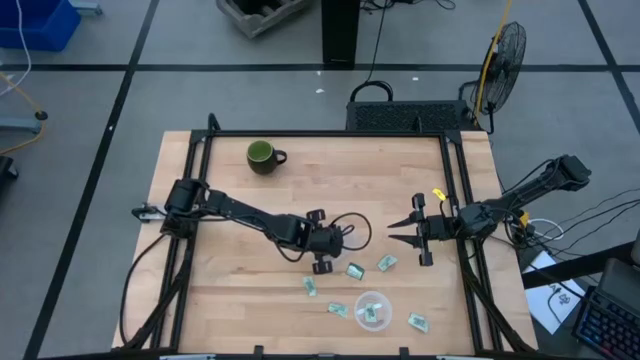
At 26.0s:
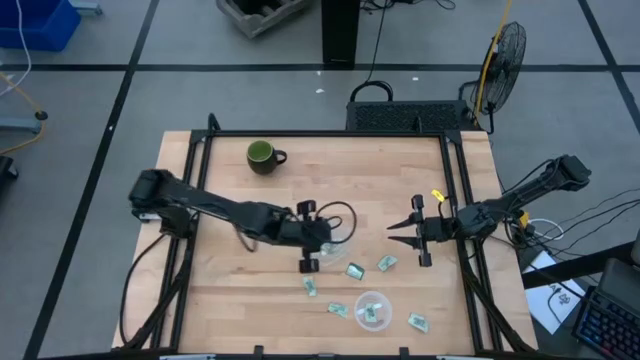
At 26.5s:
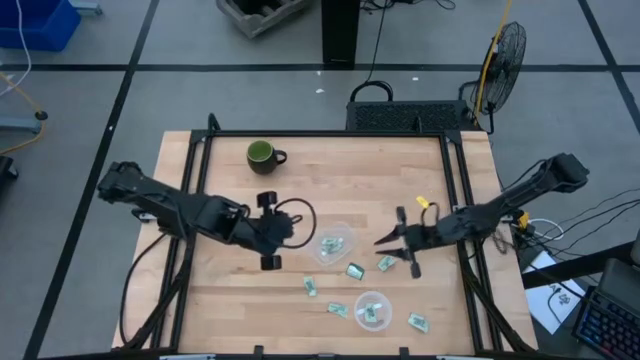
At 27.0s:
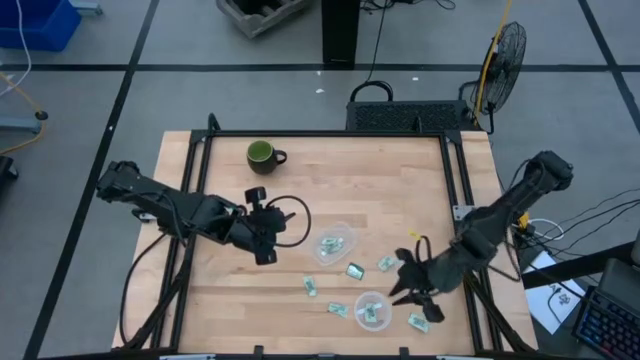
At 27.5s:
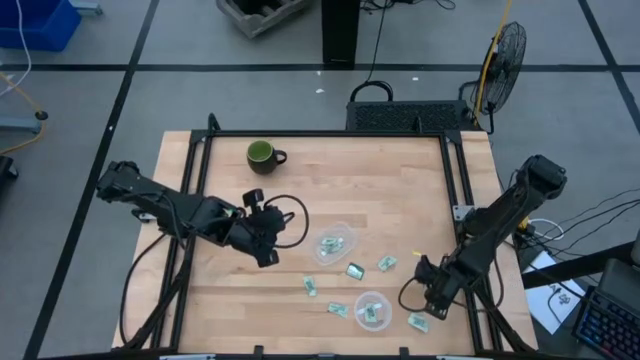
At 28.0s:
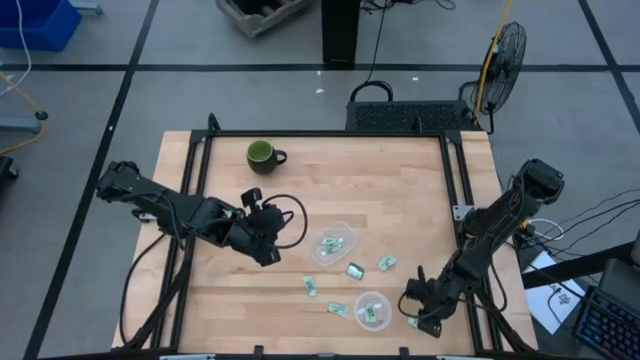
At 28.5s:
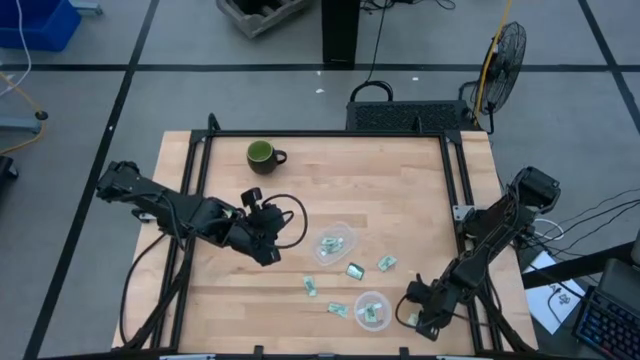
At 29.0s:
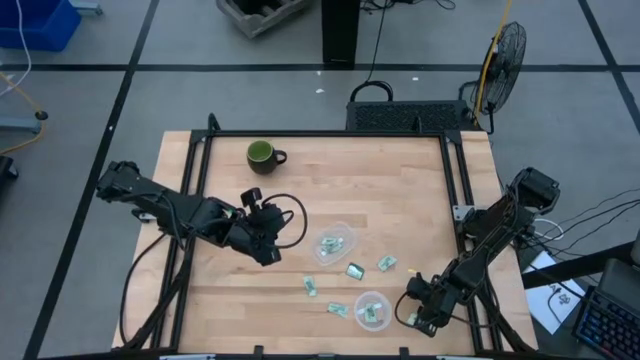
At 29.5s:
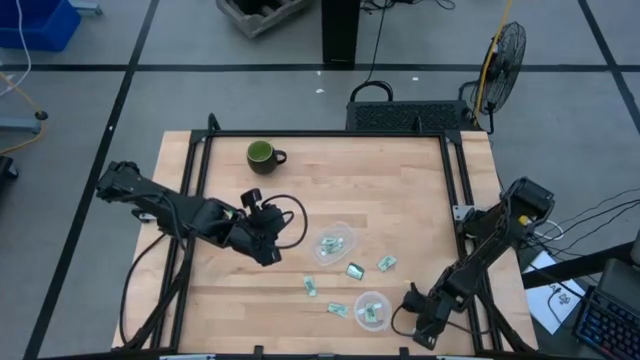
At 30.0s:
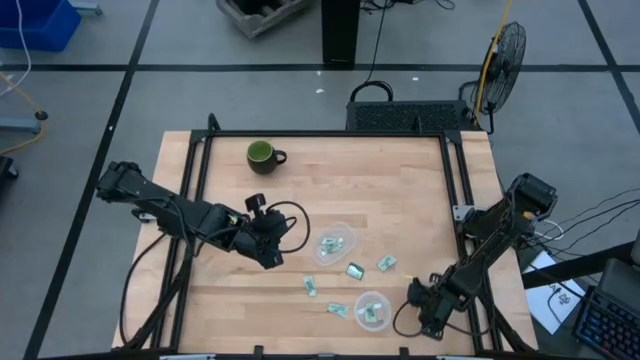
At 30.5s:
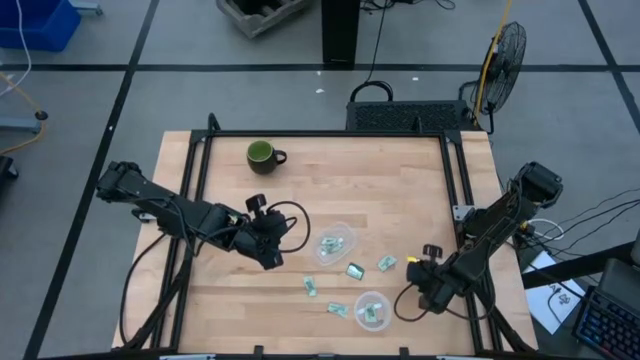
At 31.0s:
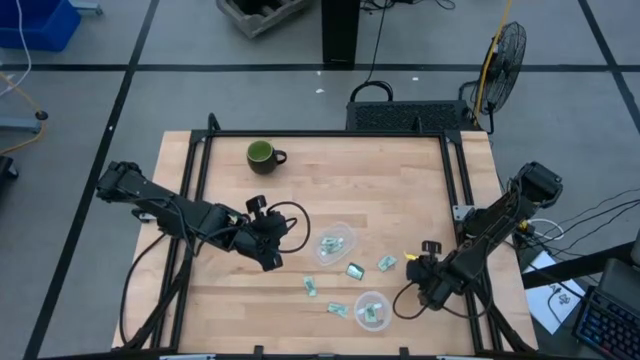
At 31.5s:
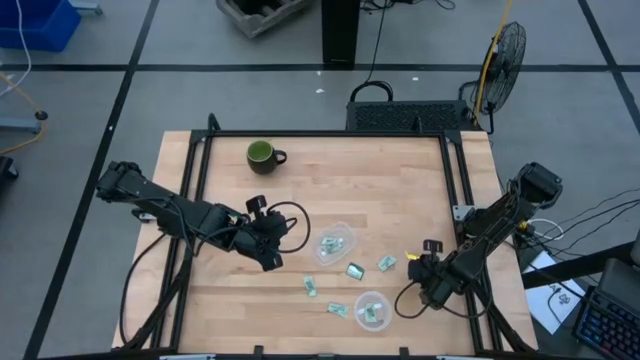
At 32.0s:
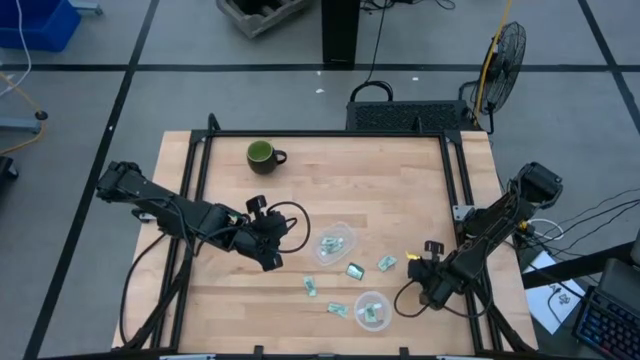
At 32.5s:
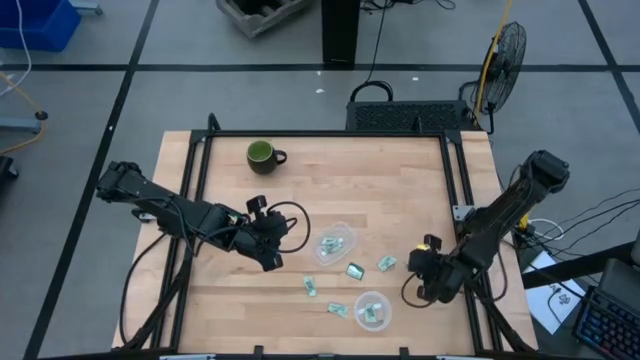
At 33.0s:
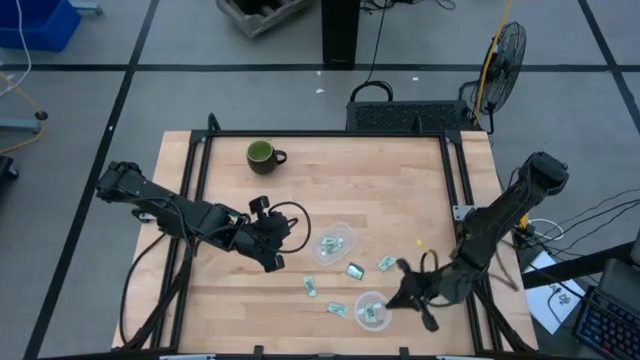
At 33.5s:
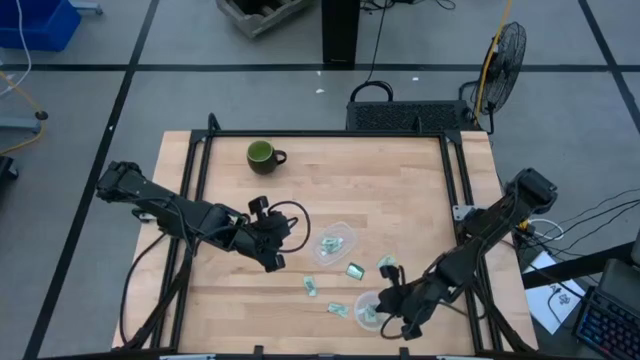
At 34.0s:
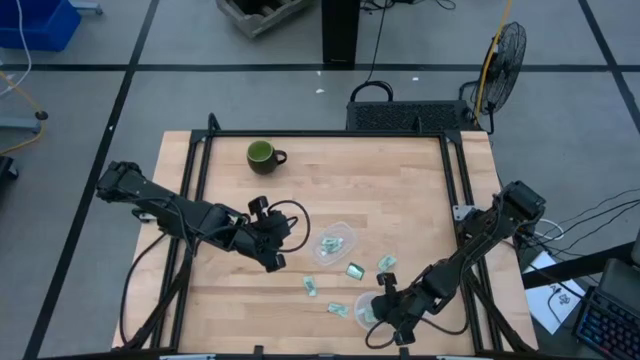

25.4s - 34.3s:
Task: Pick and place Stevia / Truvia into bins
Put the stevia packet into the bottom transparent container

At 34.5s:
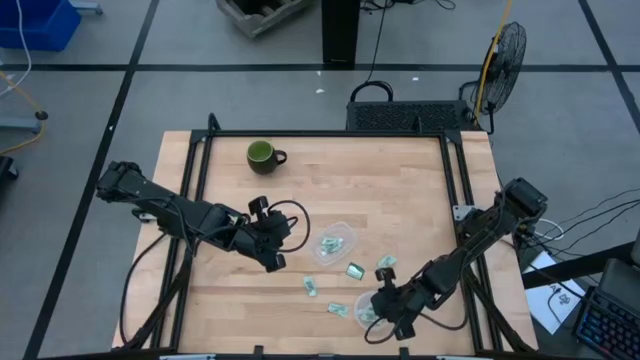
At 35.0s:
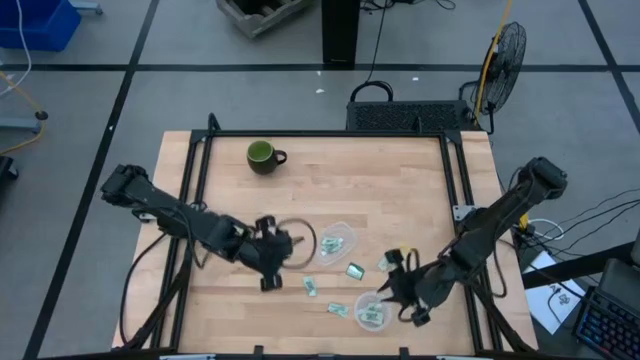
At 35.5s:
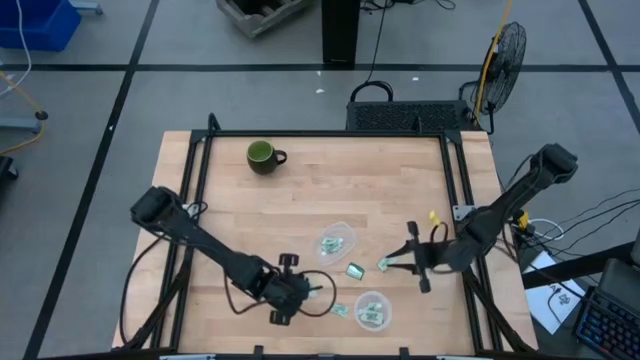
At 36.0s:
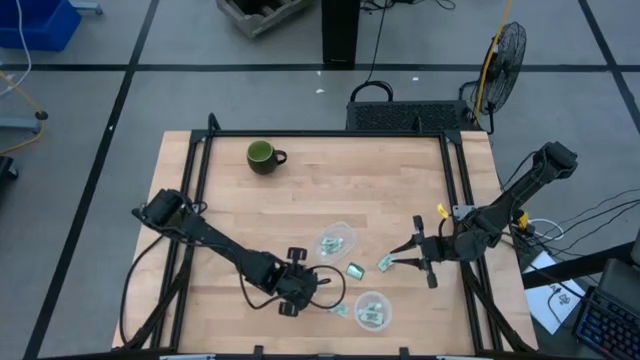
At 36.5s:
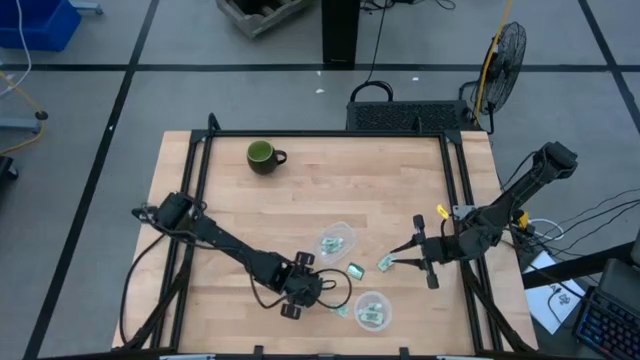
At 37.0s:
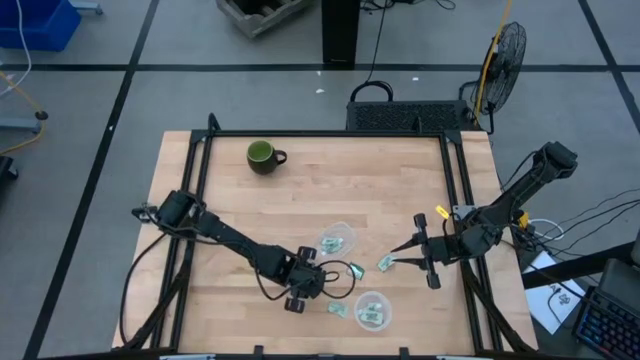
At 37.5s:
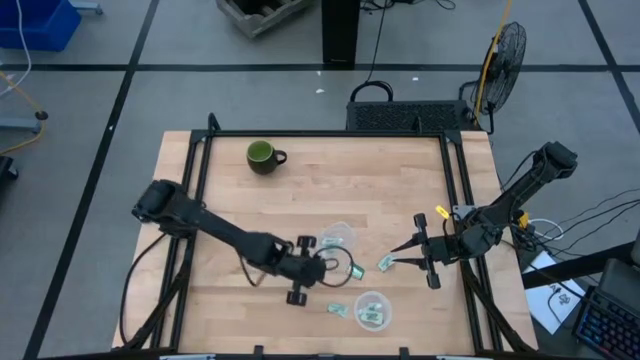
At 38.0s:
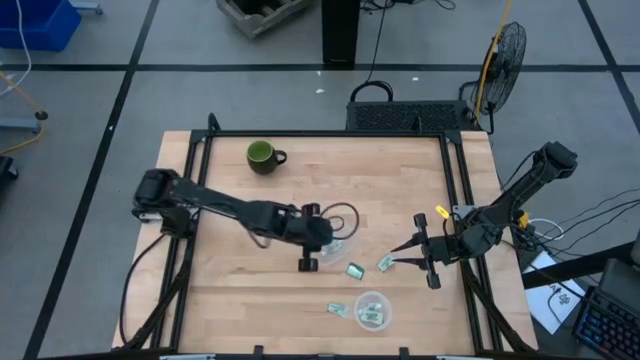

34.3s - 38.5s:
Put the stevia packet into the top transparent container

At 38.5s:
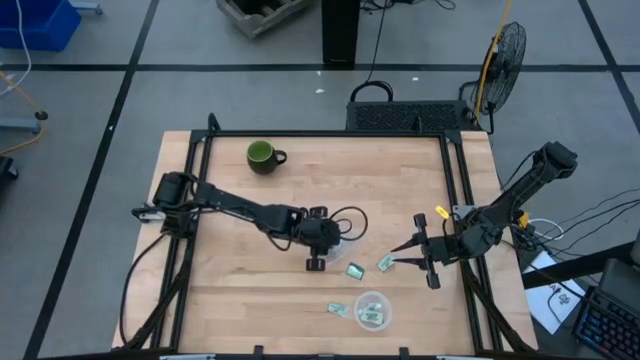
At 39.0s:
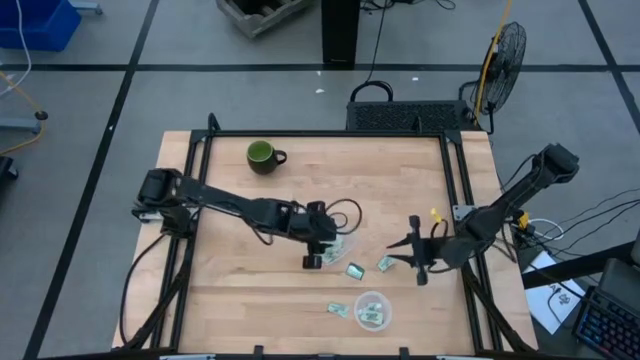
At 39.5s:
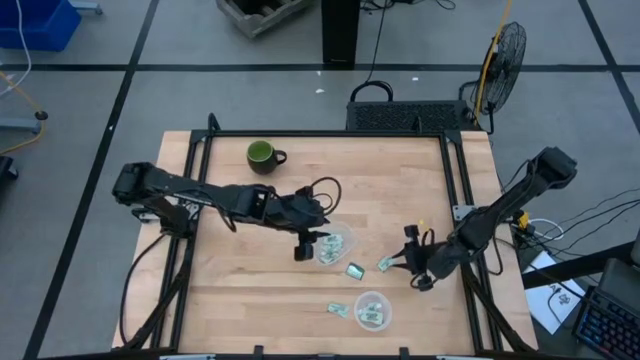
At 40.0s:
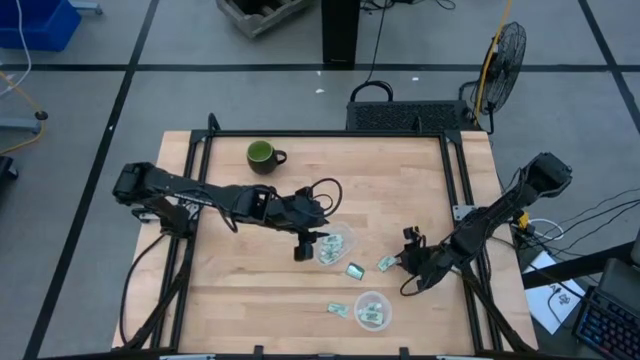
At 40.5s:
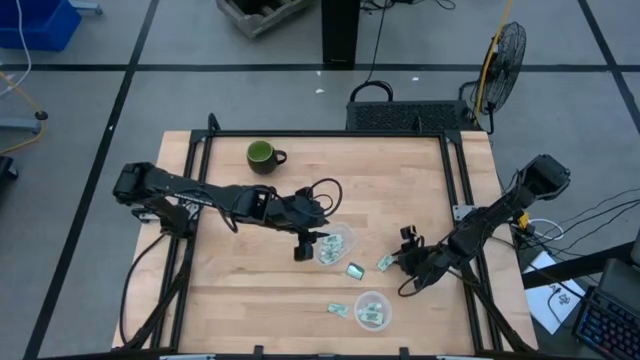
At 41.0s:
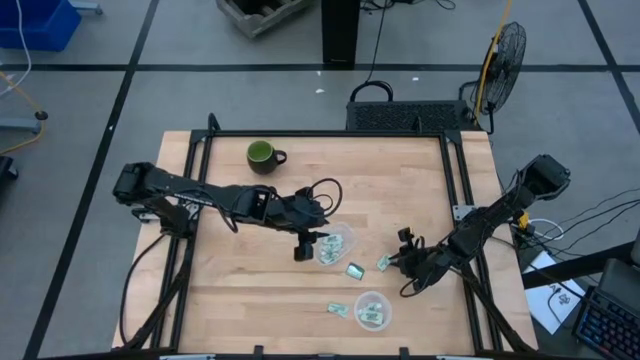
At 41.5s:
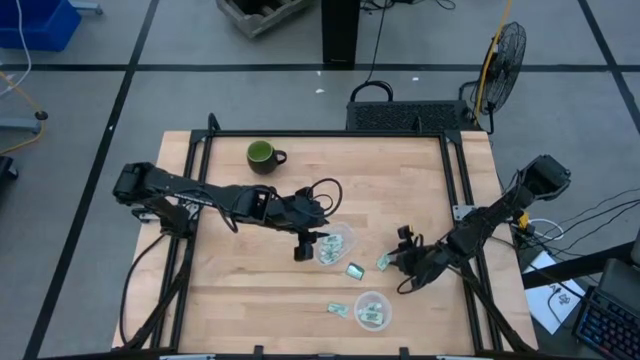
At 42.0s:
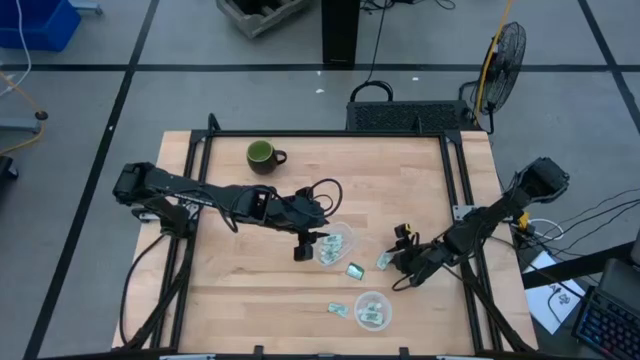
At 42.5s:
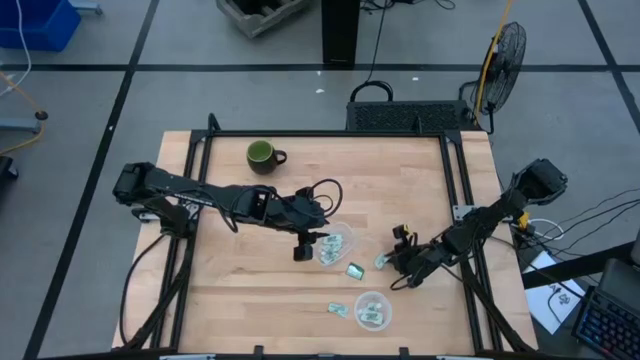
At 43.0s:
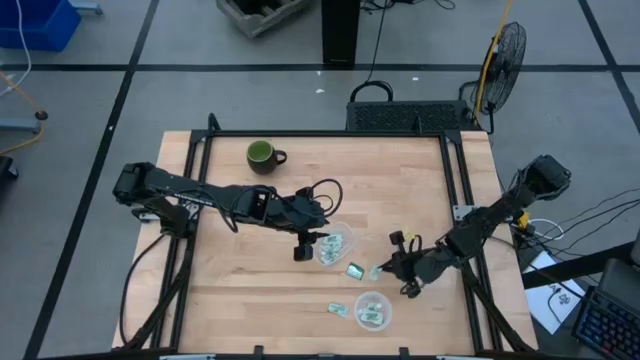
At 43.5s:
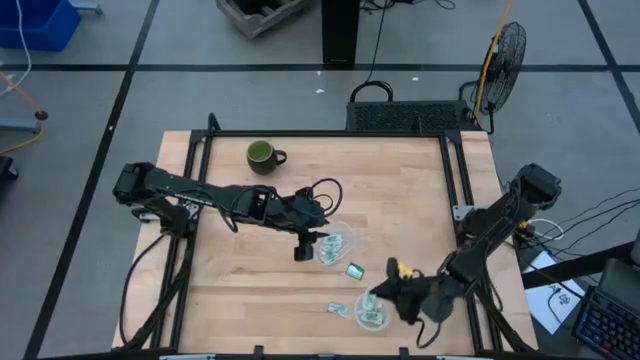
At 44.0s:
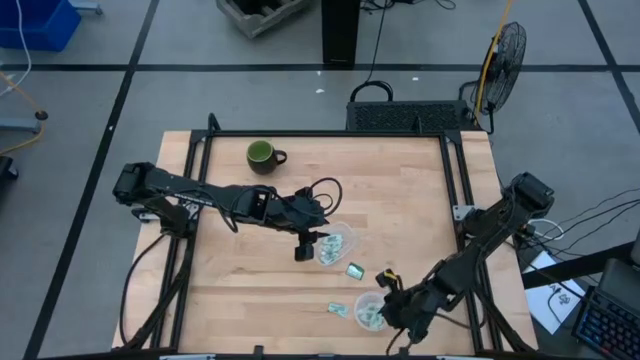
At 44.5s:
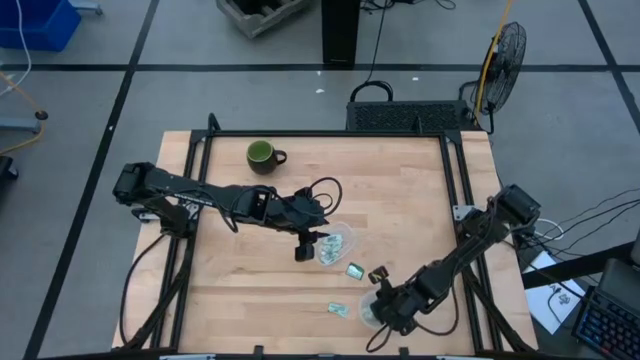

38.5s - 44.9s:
Put the stevia packet into the bottom transparent container

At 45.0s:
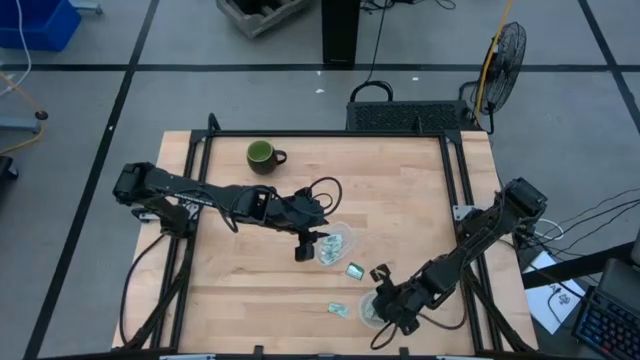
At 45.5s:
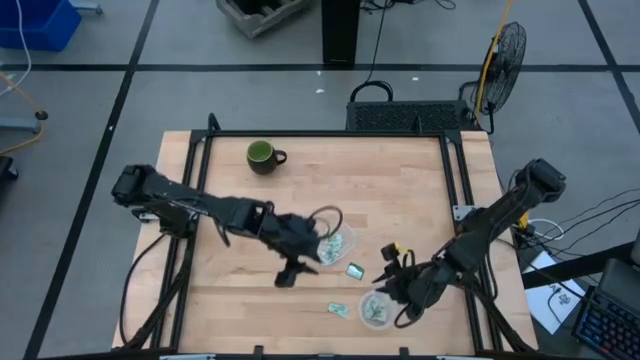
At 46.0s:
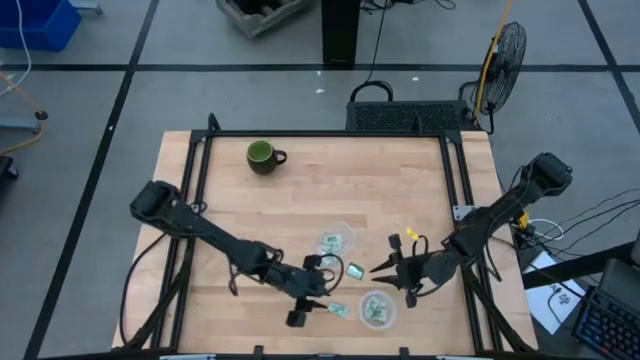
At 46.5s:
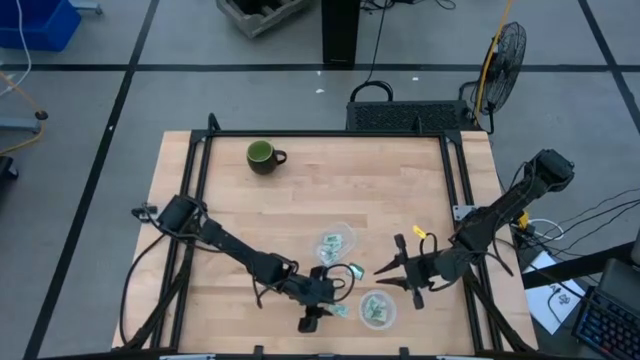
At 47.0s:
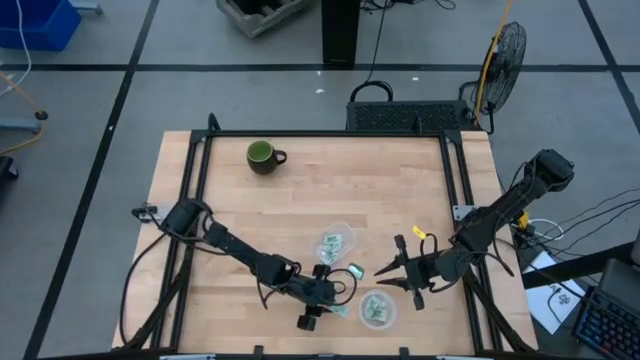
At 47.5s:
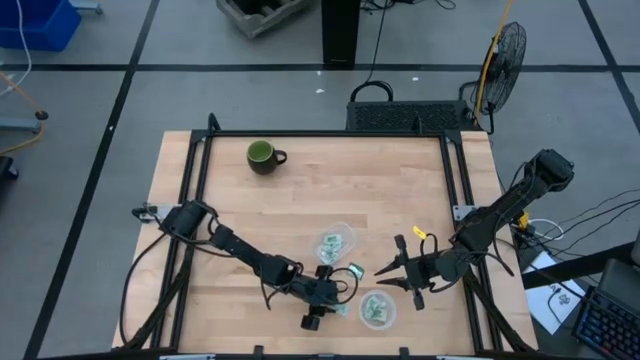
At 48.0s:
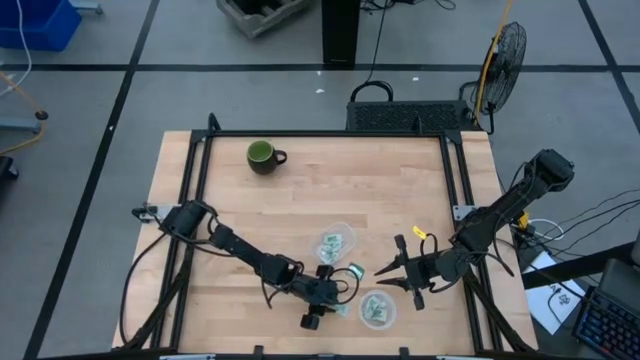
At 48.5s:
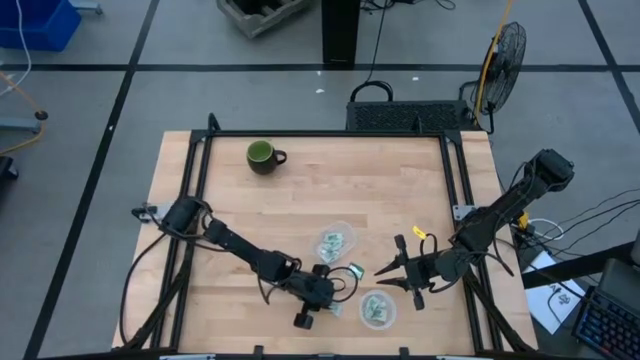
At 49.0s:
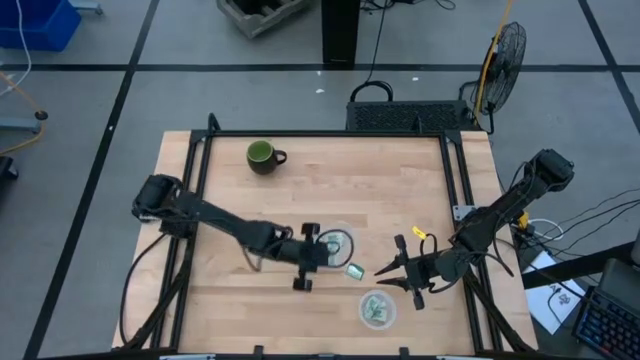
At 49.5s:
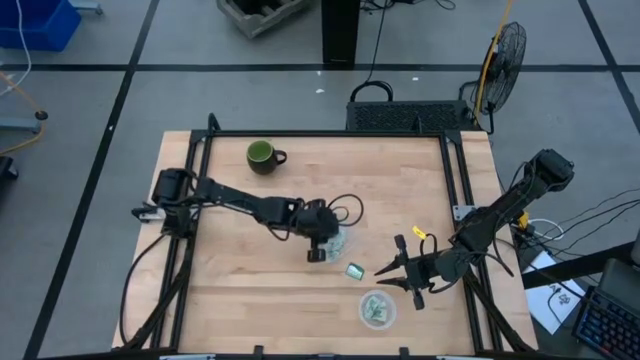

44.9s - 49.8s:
Put the stevia packet into the top transparent container
